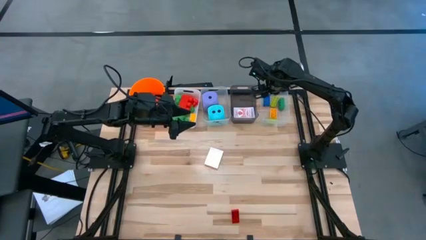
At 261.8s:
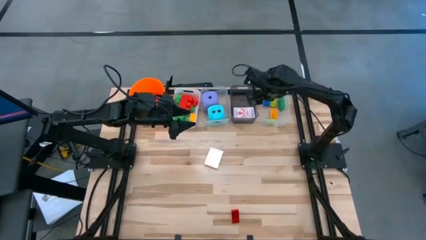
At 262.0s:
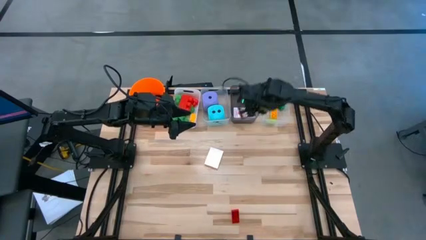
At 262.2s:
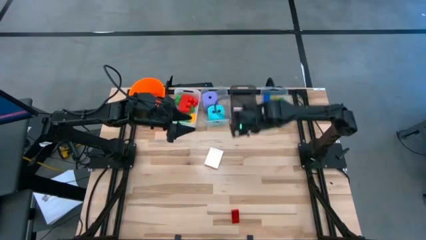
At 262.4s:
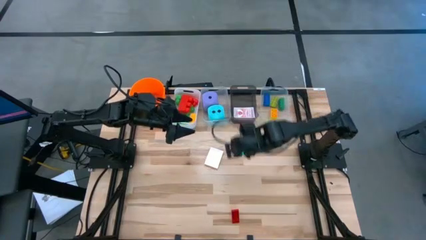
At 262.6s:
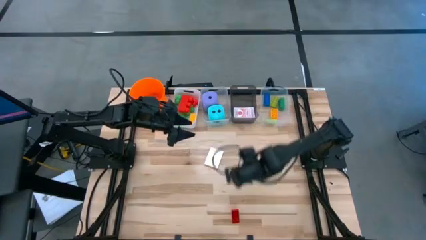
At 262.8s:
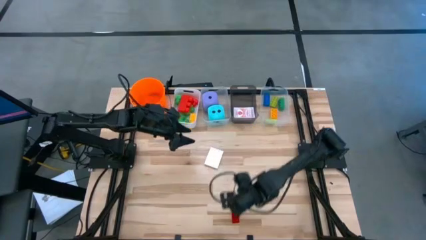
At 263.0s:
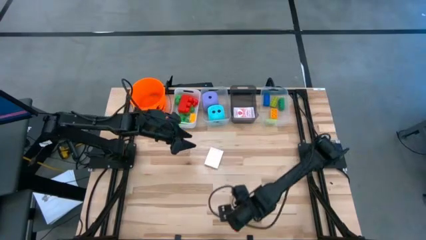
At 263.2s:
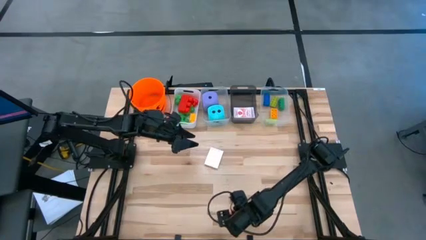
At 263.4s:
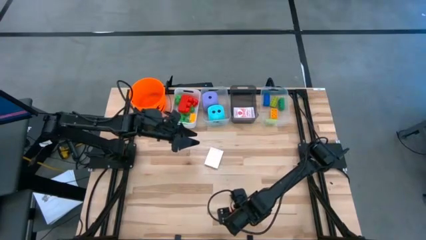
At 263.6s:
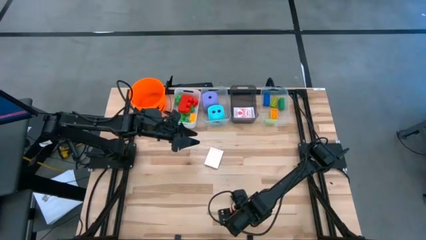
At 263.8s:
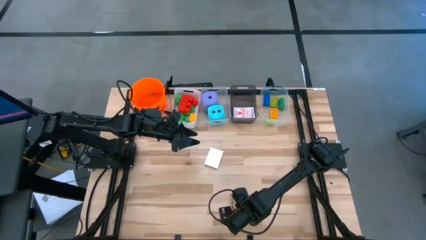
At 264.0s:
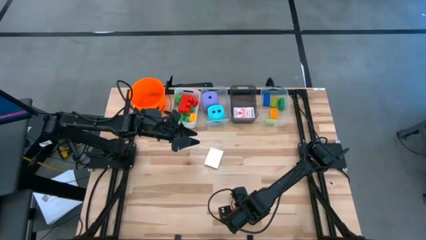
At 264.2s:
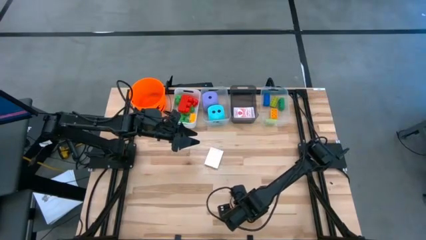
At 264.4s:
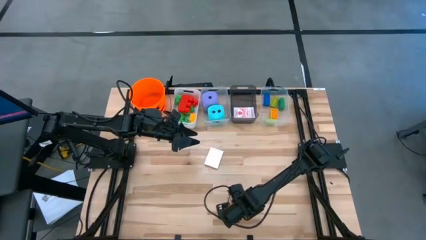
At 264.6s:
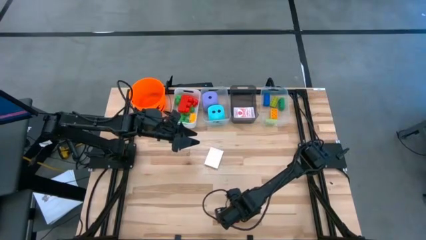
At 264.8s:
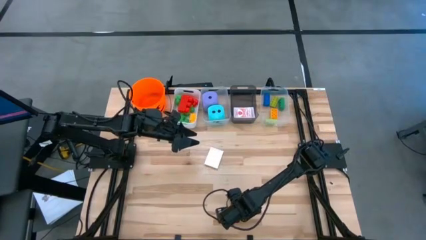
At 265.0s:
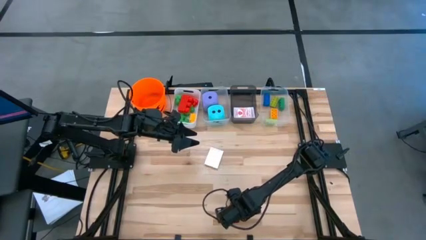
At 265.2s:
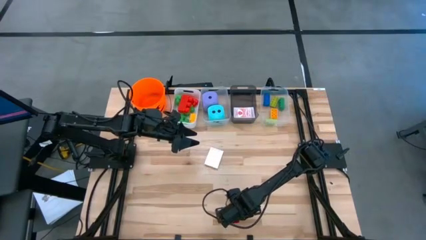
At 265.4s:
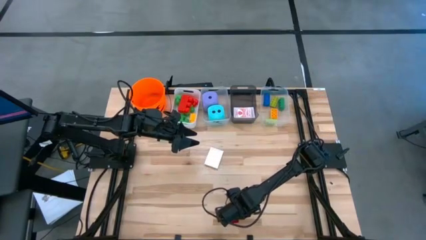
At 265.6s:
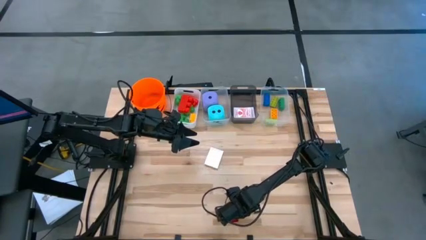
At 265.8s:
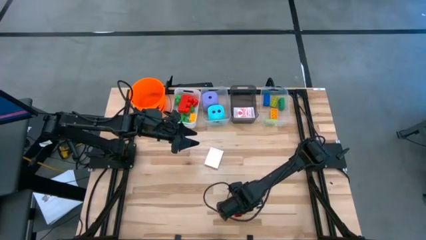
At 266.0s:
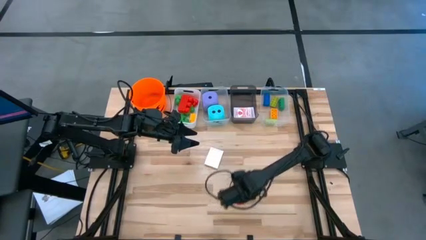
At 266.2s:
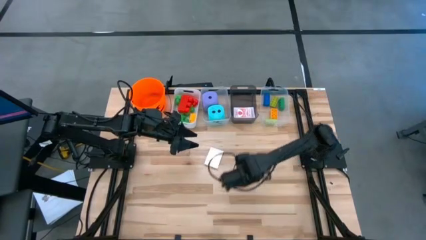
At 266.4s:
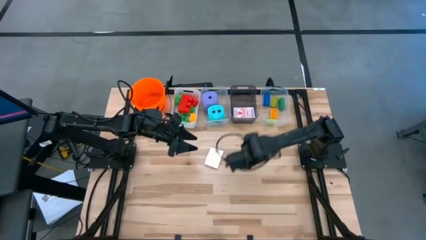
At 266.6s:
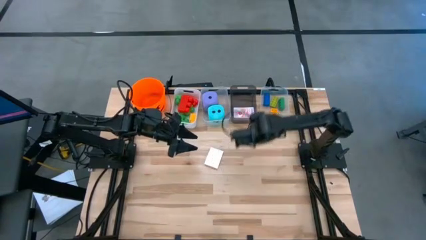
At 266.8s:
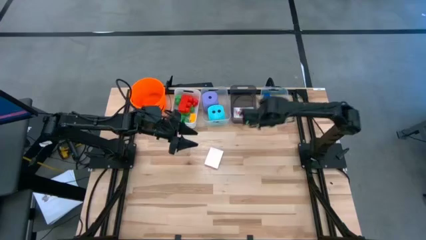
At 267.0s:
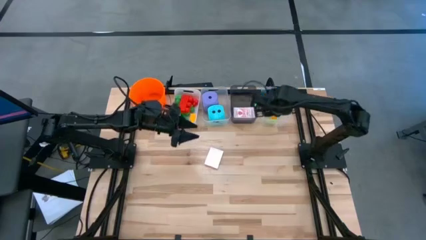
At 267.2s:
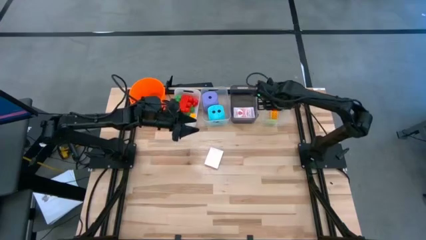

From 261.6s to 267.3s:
Task: Pick & Place Toys
Put the red game piece into the right transparent bin

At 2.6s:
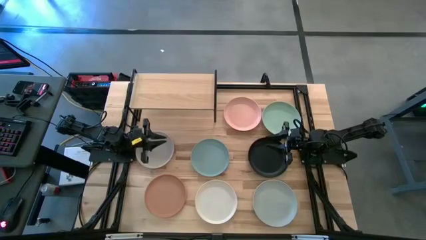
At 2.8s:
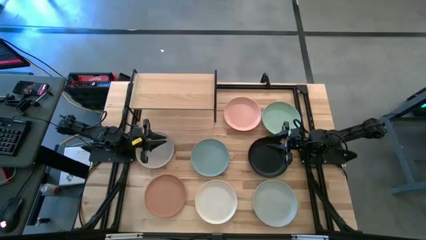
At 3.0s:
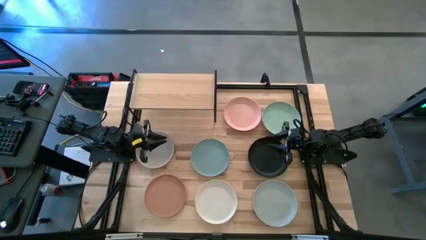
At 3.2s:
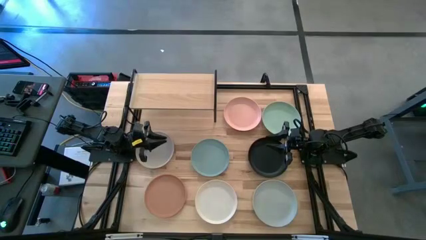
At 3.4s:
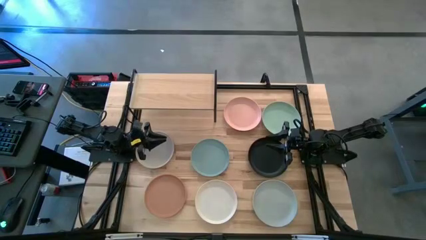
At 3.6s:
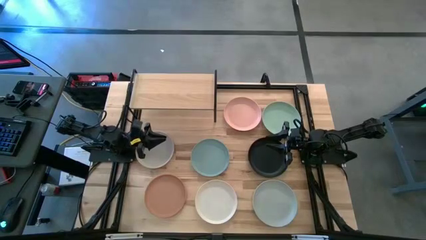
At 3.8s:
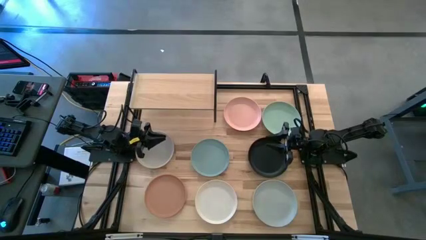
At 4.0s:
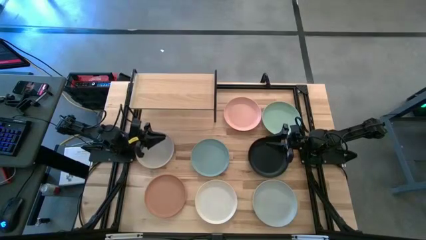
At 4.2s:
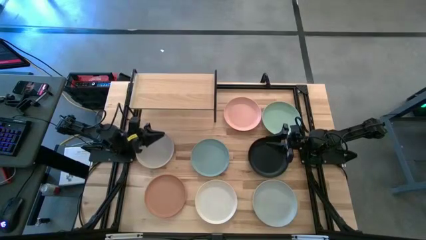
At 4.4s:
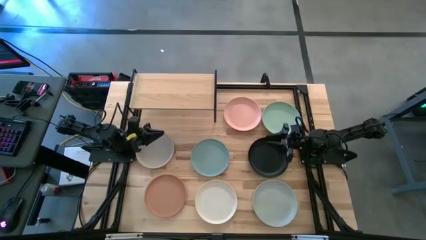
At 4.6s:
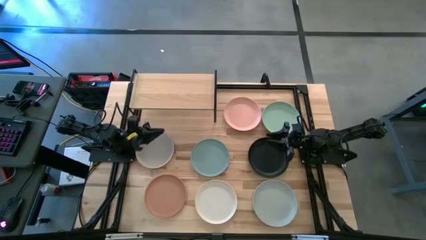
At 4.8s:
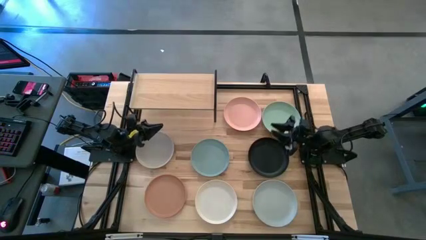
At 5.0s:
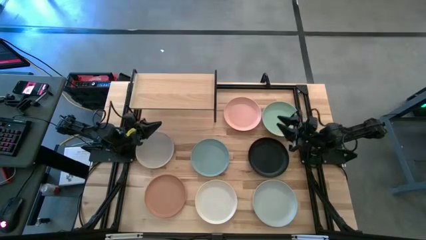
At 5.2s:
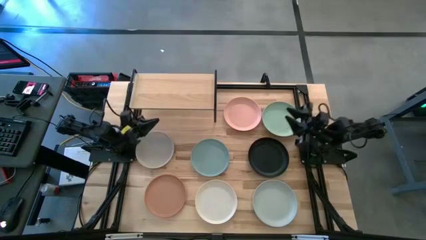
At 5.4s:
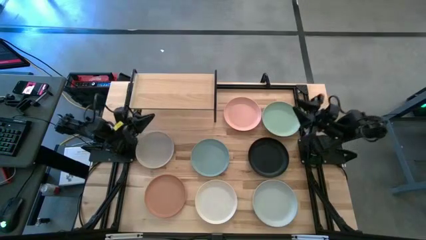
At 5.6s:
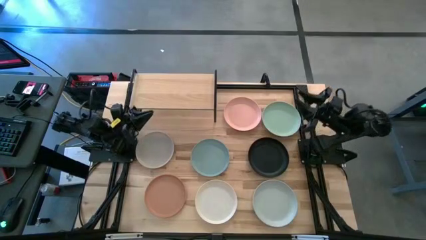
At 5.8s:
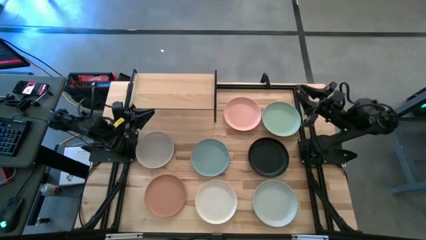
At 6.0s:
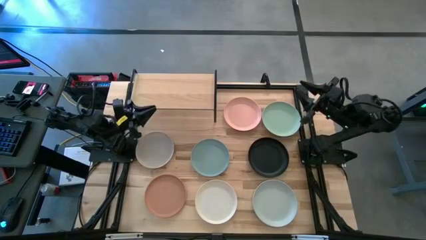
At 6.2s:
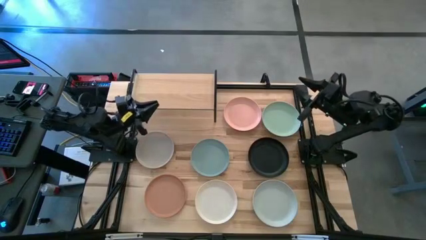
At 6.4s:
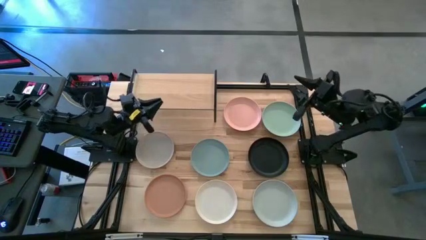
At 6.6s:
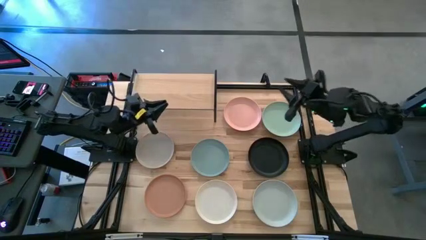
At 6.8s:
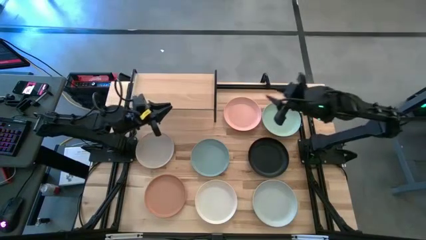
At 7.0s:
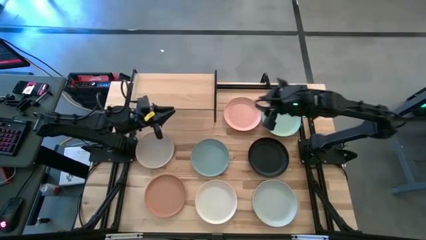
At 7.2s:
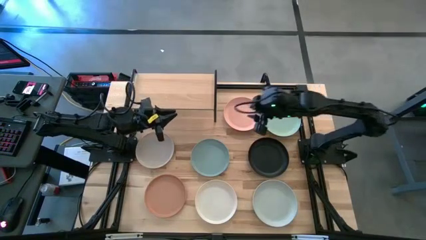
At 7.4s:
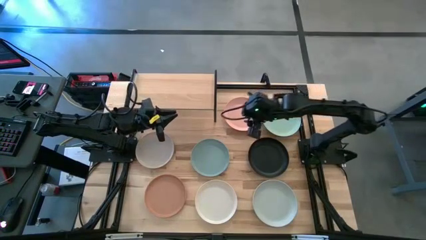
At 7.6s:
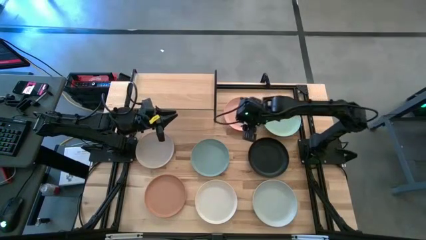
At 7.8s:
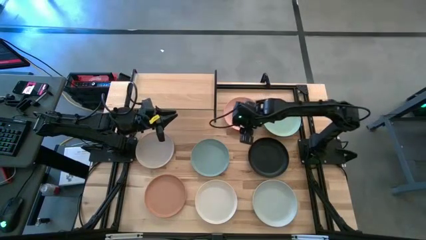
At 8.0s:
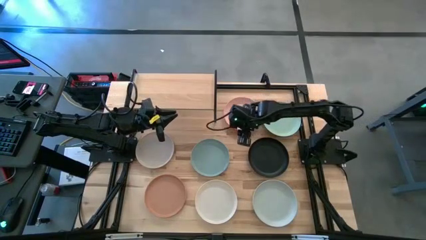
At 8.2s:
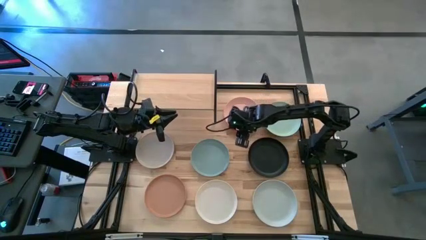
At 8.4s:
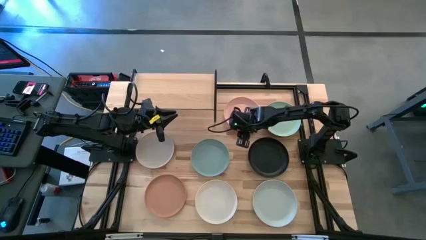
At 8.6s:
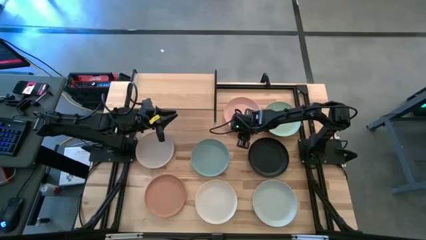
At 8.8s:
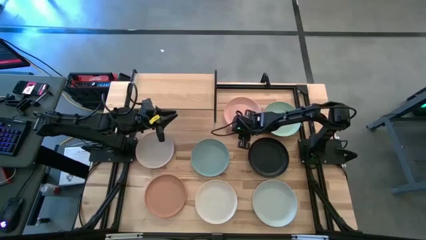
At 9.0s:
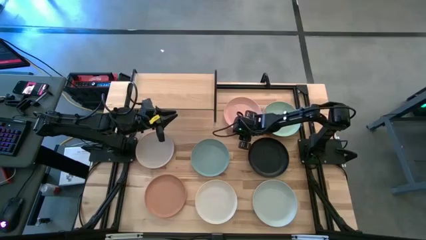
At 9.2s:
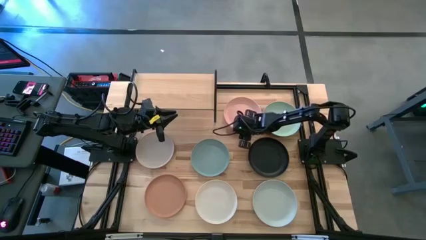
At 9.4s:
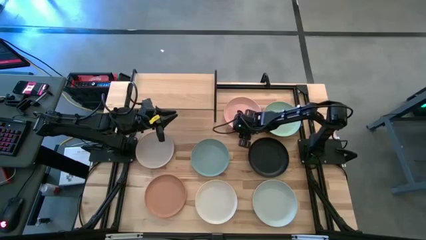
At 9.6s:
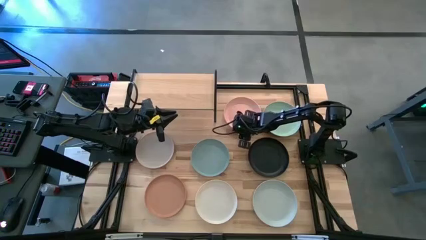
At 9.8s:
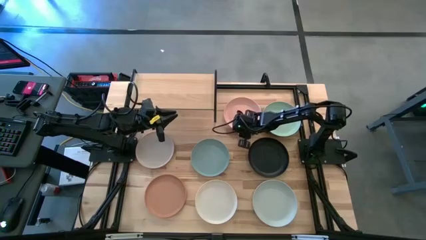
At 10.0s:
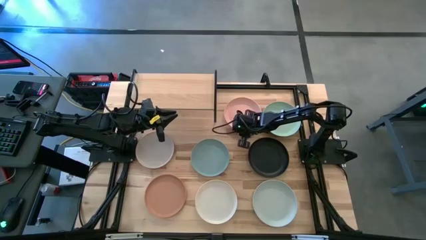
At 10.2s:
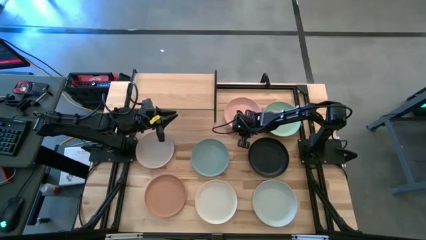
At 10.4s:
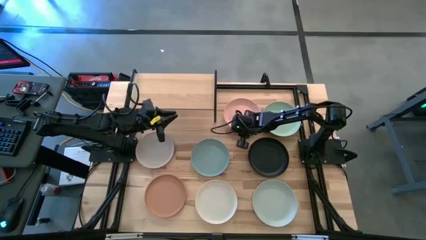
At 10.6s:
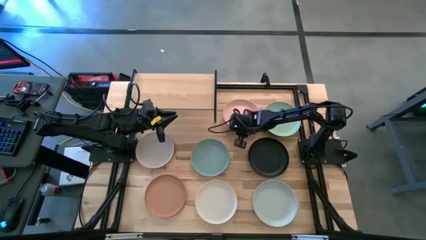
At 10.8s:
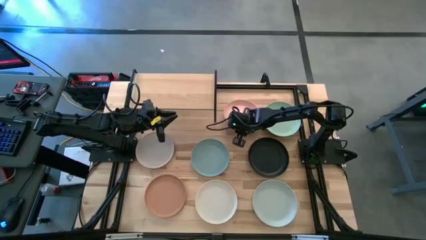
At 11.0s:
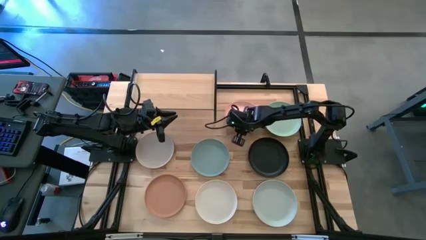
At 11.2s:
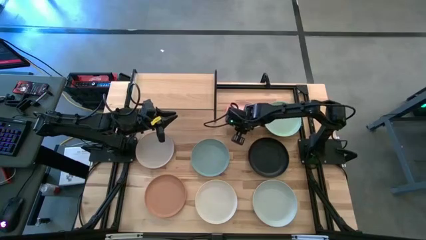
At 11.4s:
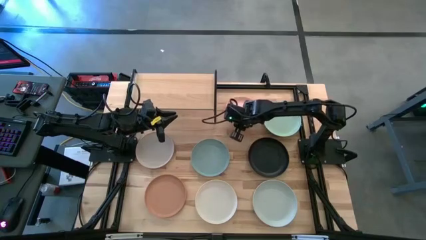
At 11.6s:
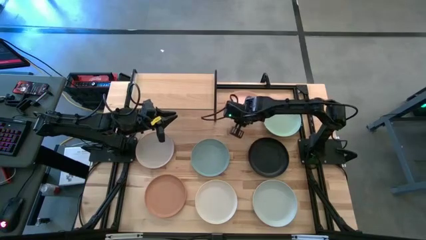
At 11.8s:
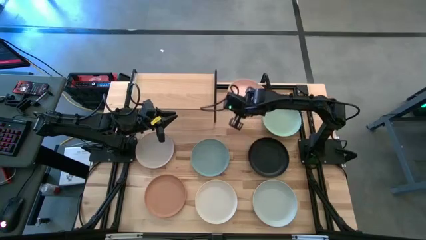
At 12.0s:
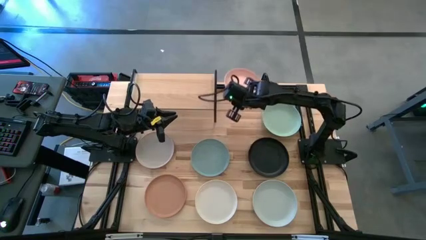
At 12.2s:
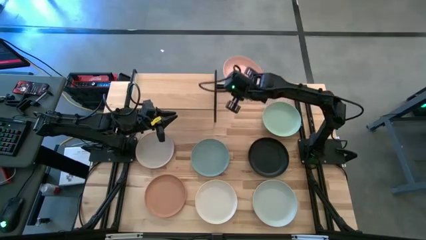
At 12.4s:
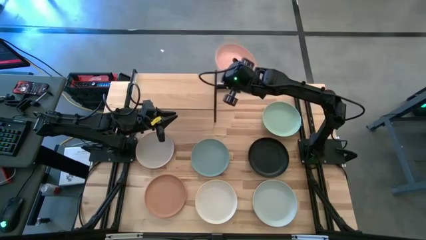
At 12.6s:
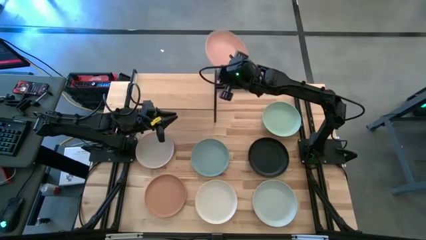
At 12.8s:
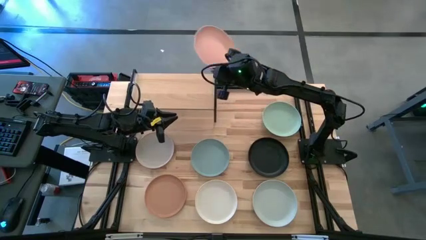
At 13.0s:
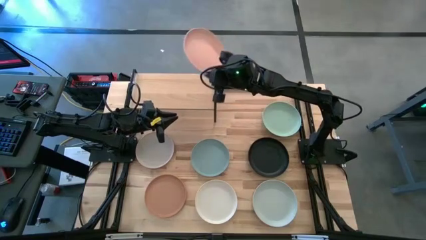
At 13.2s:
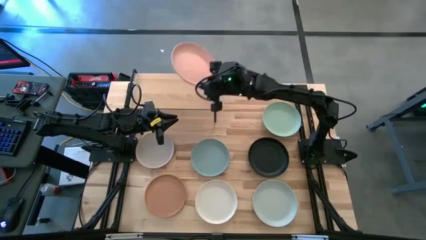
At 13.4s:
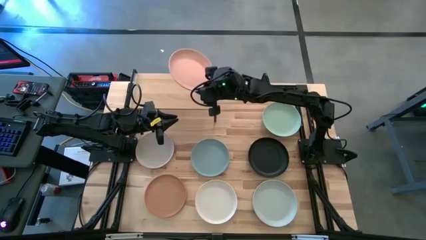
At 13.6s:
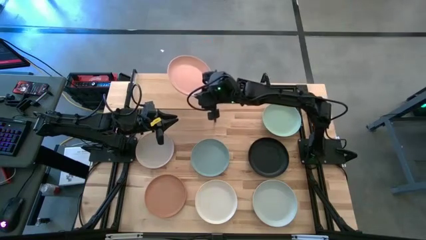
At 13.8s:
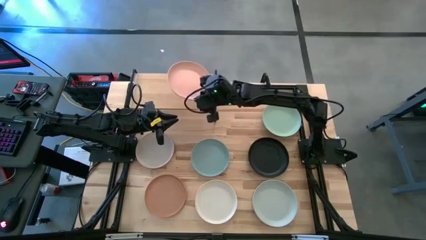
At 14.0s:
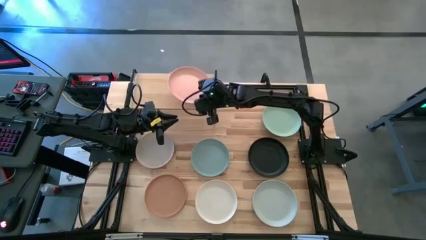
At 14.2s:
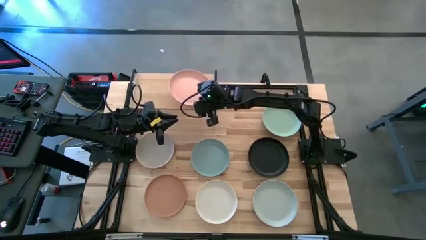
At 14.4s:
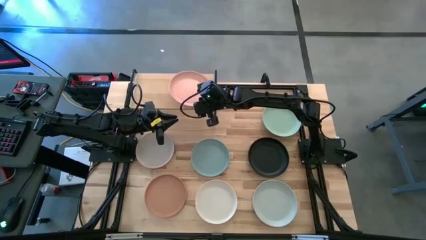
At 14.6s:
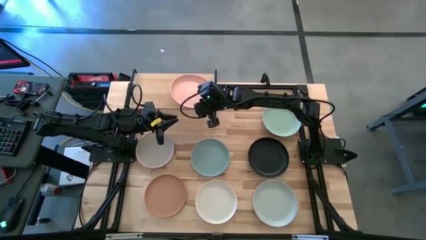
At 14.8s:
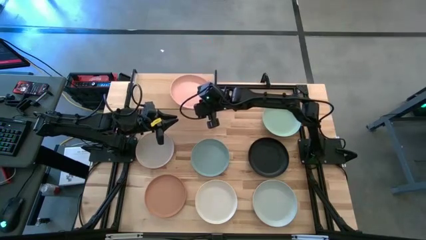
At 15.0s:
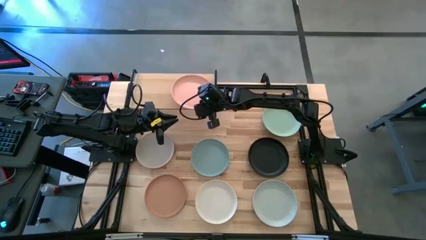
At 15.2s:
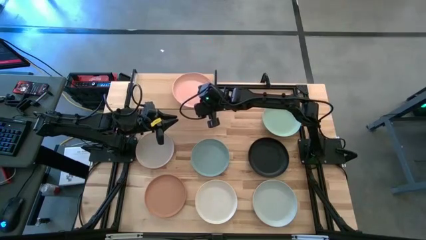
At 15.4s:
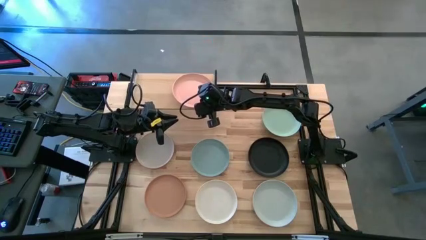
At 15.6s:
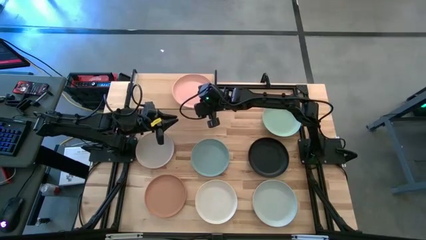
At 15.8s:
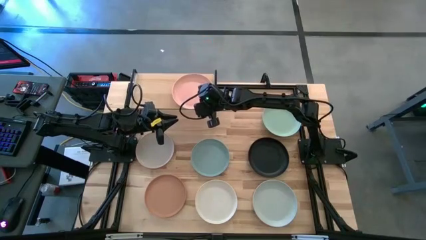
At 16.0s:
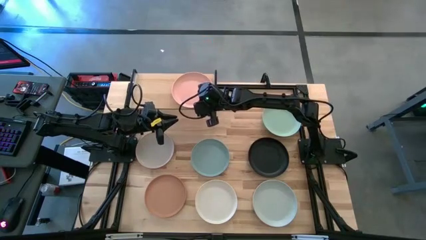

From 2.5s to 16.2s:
Task: Place and stack plates onto a shelf
Put the light orange plate on the shelf
